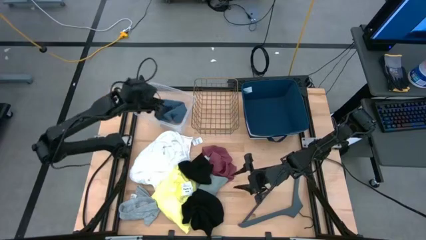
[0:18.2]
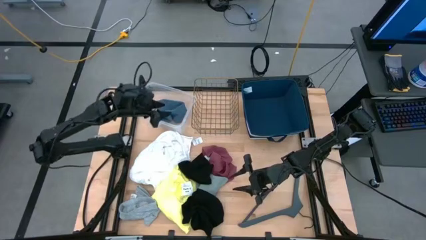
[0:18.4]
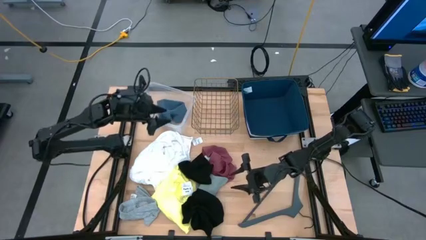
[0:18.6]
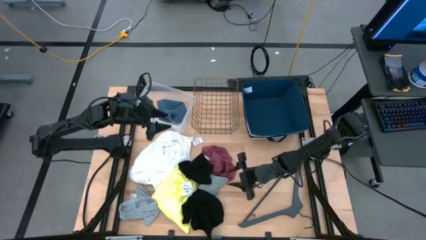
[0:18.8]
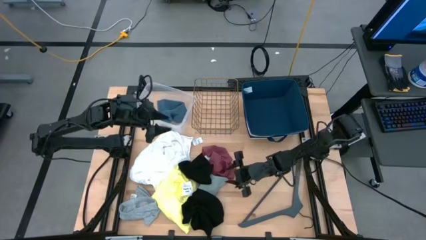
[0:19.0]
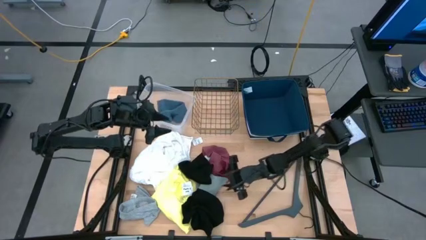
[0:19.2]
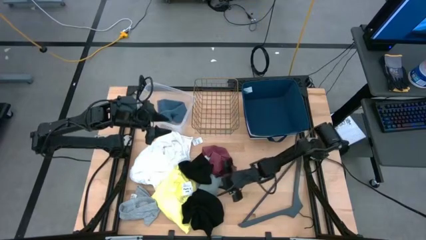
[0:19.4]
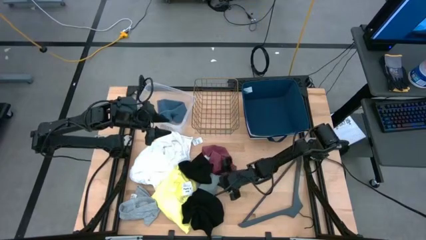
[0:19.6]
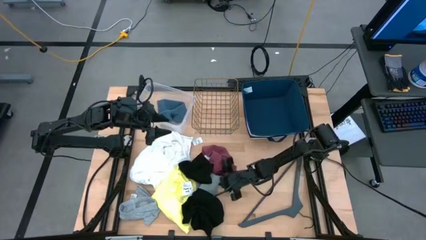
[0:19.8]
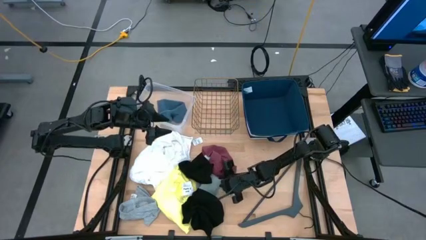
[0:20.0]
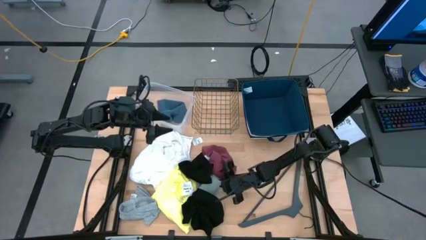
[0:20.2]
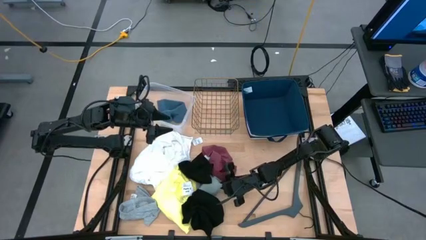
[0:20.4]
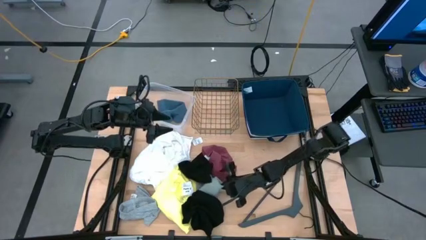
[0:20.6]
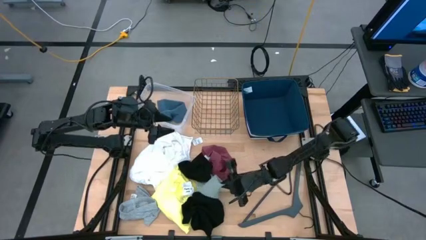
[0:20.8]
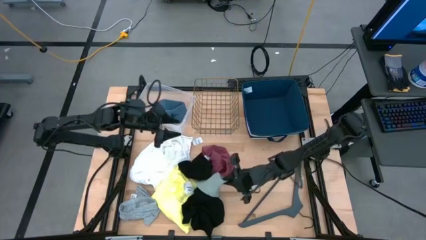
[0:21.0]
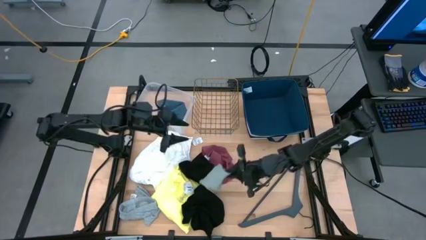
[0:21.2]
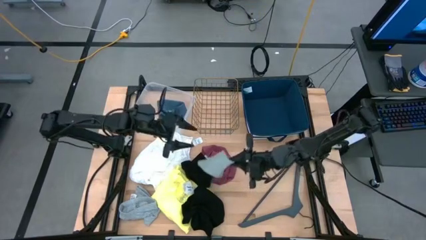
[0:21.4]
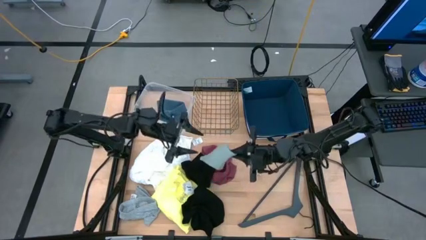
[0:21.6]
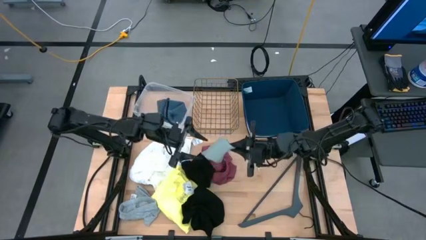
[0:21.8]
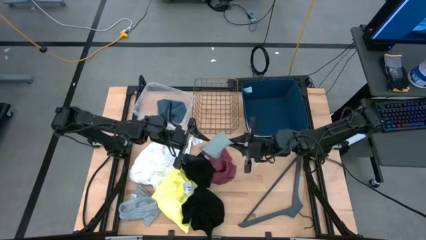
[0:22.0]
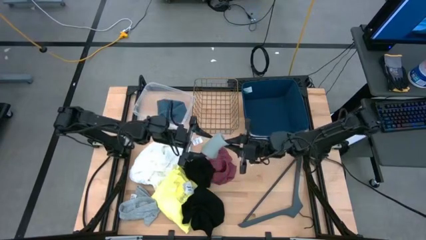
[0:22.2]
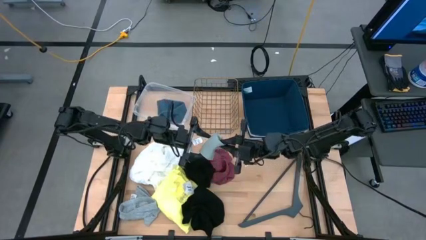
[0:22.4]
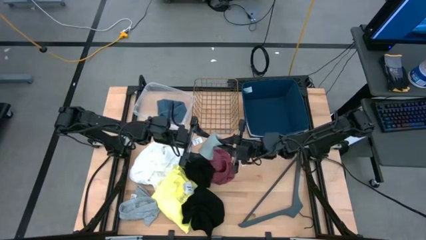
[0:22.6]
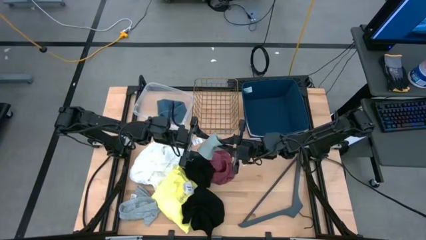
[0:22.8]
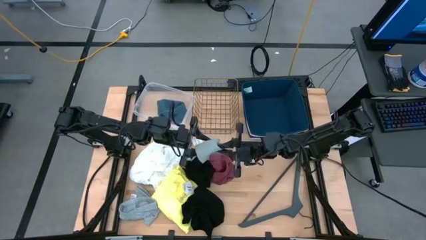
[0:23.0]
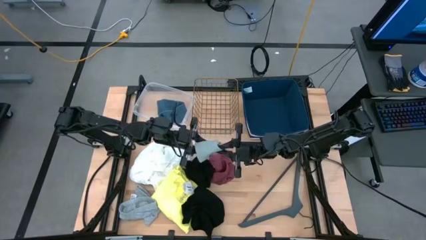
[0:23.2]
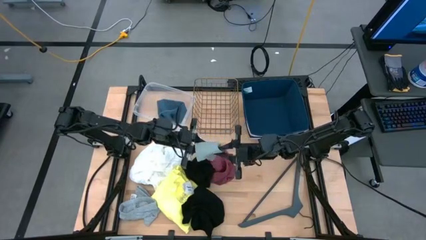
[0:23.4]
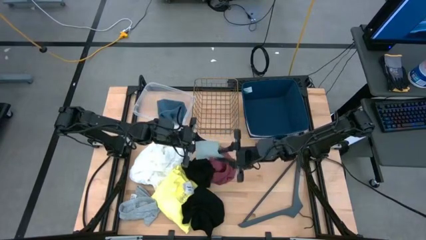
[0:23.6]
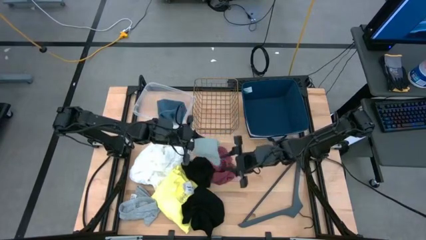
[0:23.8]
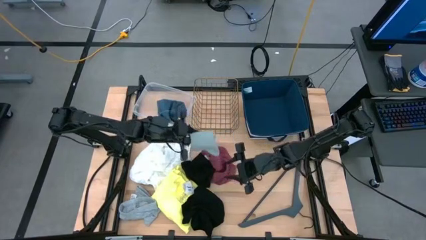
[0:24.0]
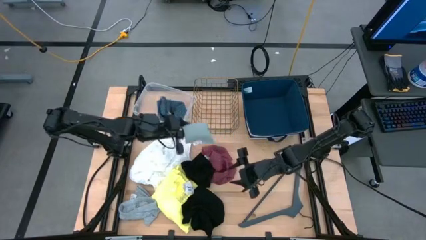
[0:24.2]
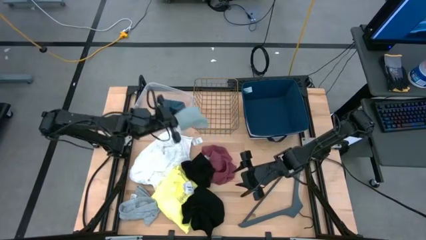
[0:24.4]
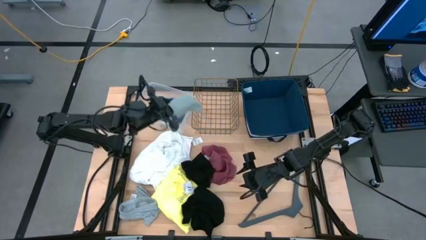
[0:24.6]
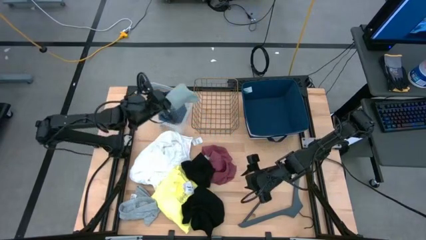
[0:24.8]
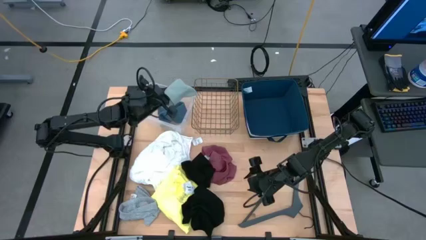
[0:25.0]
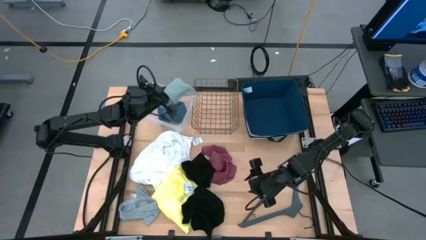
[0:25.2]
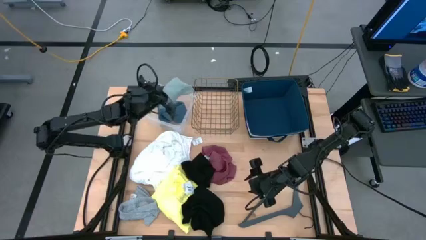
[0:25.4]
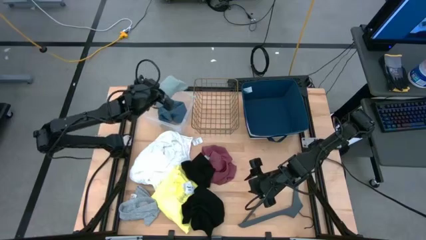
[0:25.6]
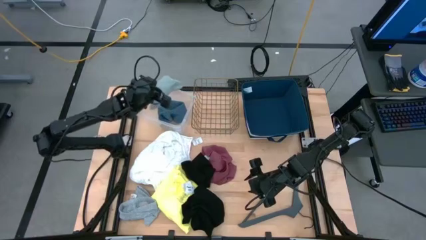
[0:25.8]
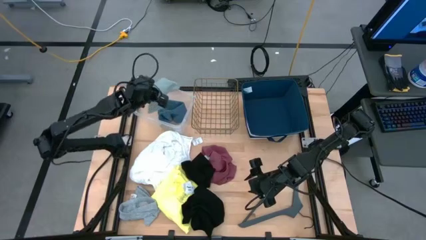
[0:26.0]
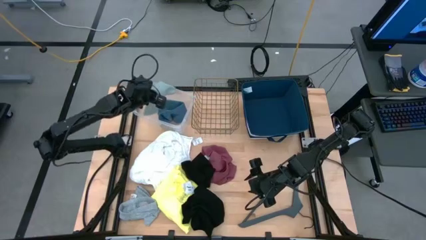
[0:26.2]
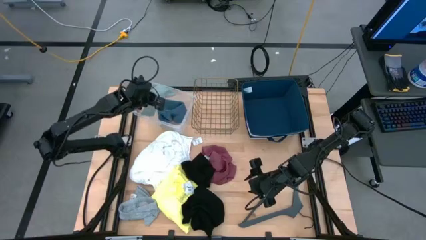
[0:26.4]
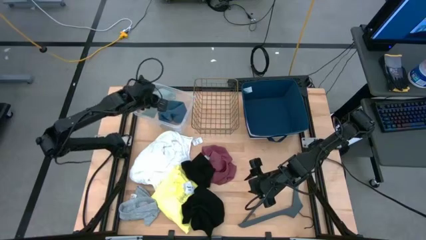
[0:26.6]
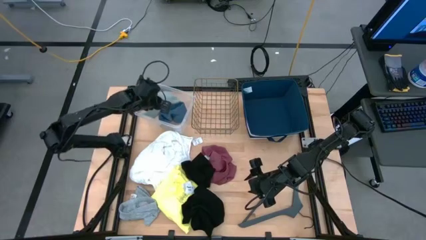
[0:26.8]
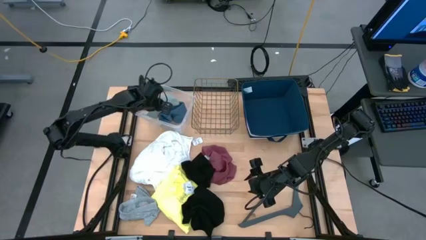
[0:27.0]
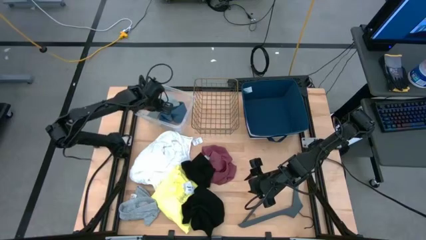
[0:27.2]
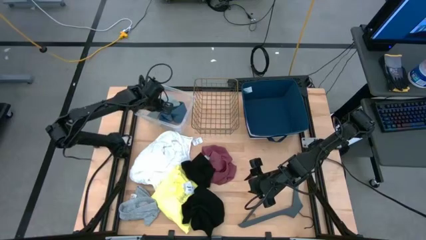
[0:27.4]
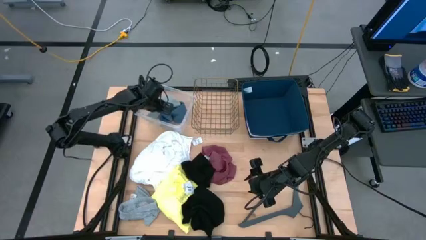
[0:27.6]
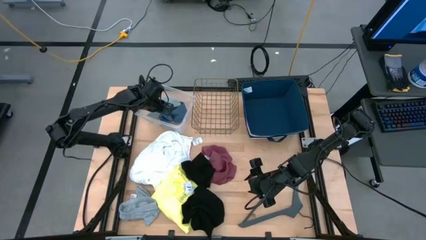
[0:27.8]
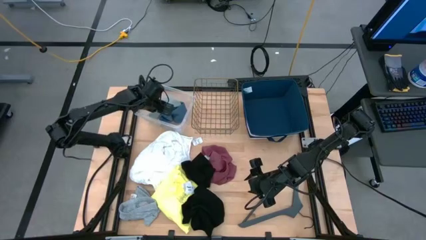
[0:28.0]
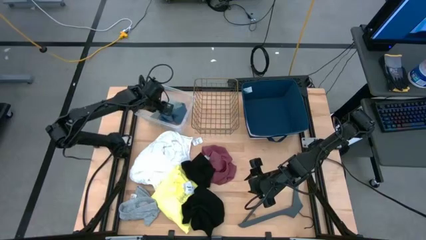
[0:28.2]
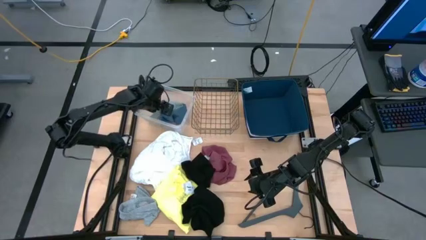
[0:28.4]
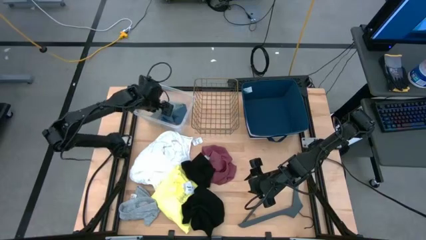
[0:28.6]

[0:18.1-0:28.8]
Task: Pick & Place Cloths
Put the gray sock into the transparent bin
